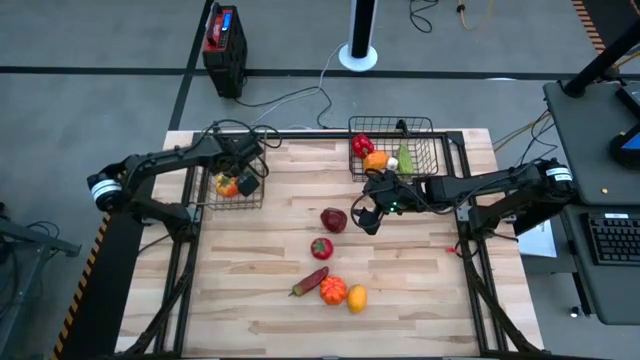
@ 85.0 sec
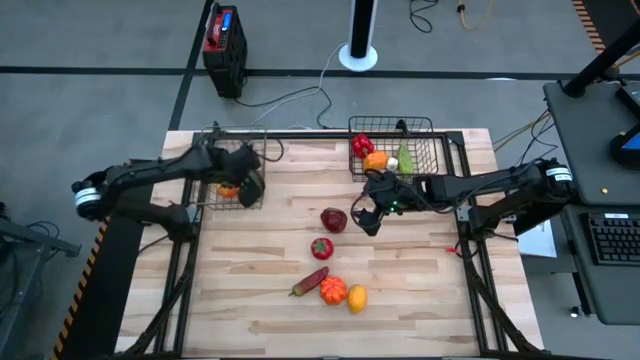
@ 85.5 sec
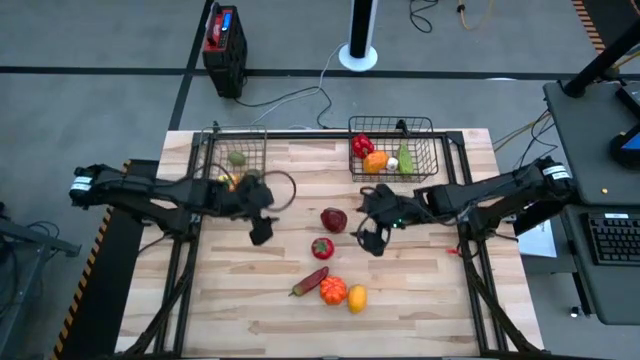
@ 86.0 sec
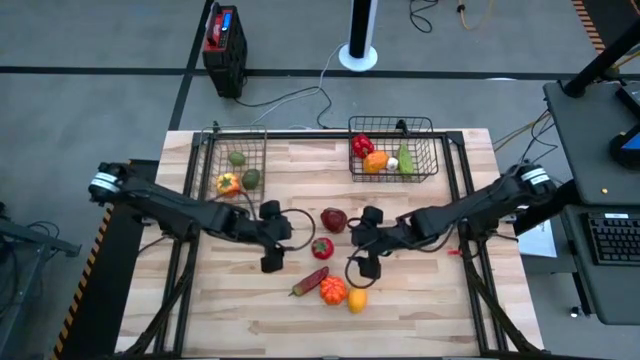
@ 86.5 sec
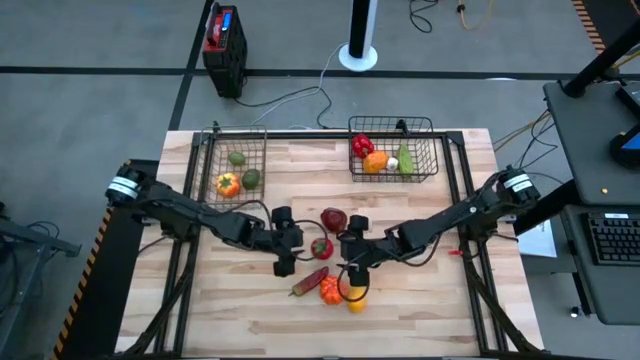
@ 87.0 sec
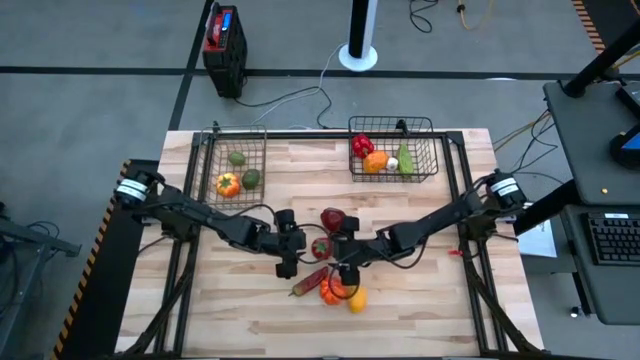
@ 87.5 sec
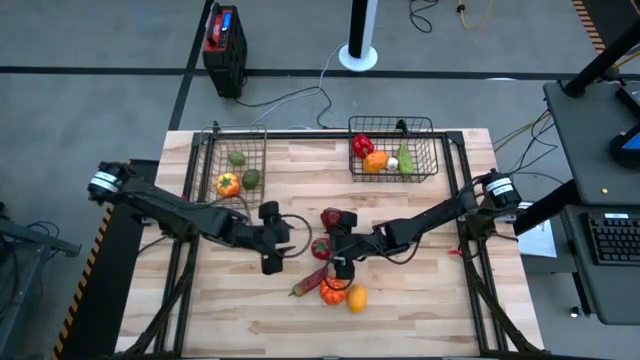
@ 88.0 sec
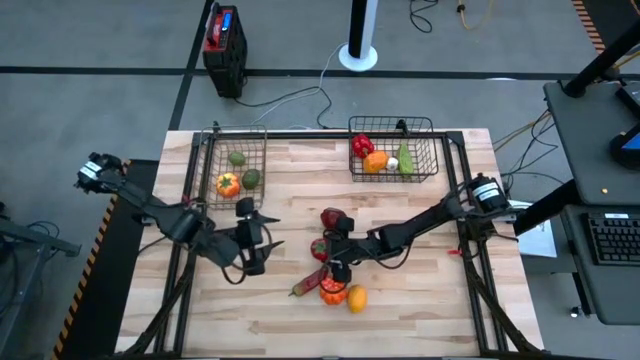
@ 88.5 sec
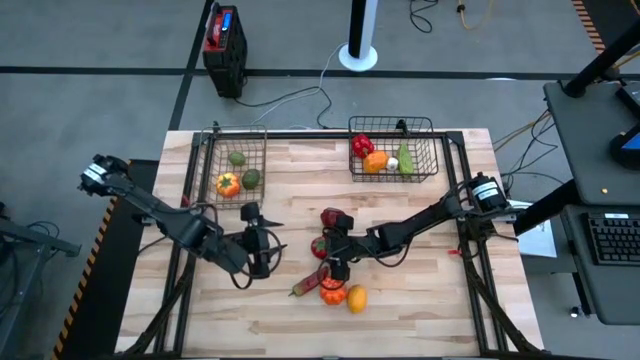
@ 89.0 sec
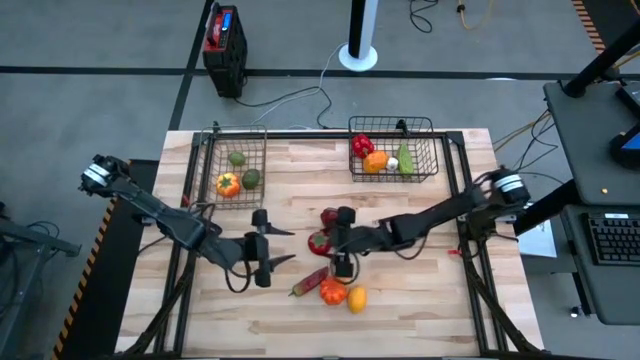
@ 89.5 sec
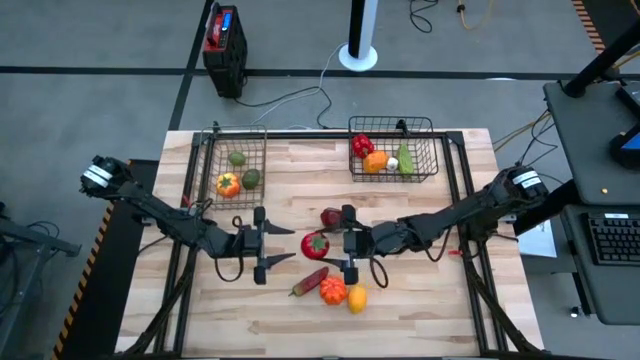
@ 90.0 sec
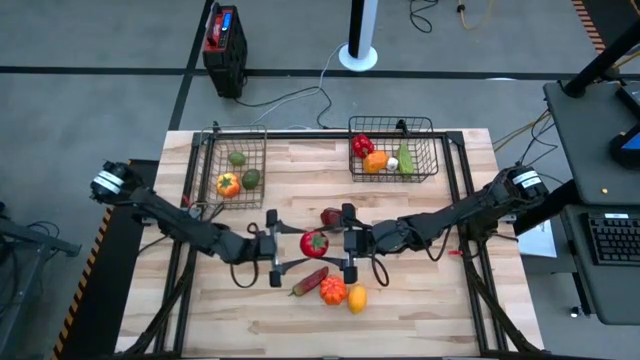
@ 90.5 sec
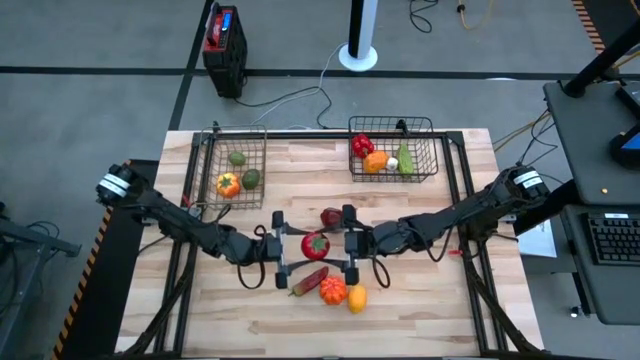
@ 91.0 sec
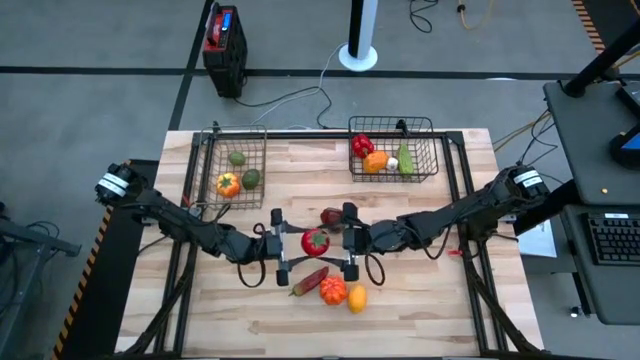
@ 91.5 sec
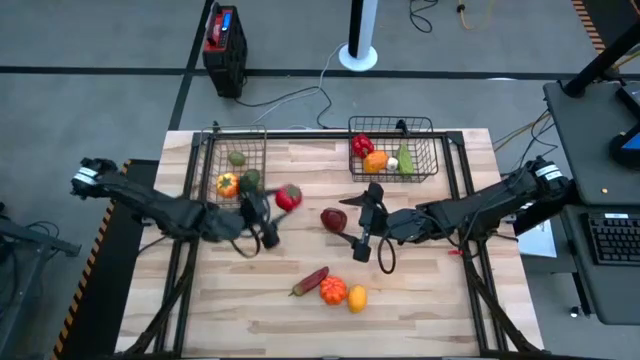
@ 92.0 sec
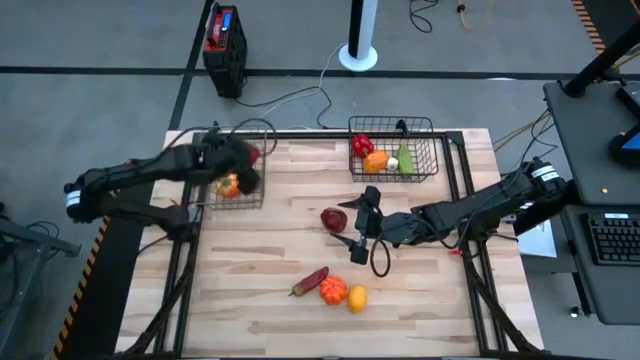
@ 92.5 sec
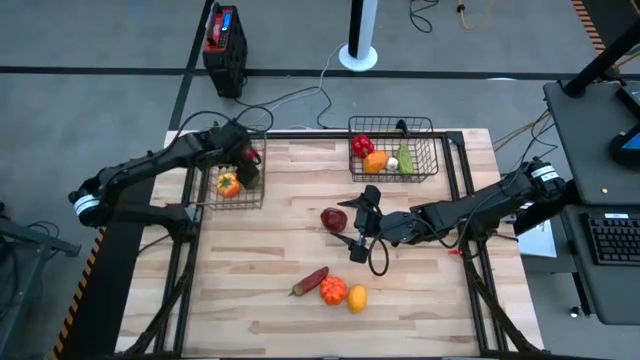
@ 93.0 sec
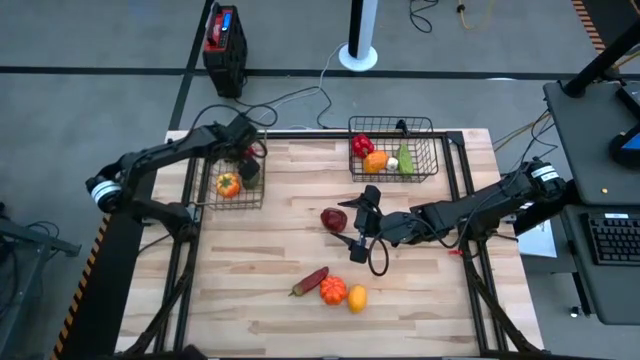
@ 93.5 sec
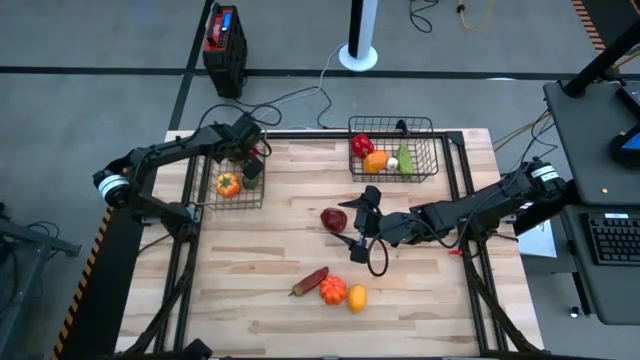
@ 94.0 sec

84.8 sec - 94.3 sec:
Task: Sort produce into baskets
Put the tomato into the brown wire basket

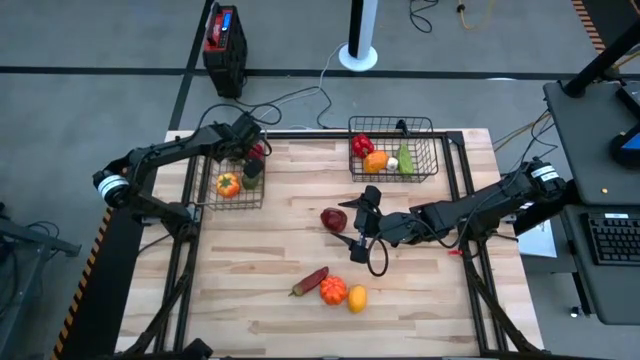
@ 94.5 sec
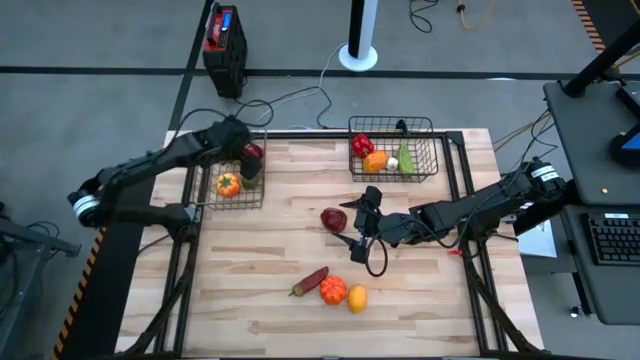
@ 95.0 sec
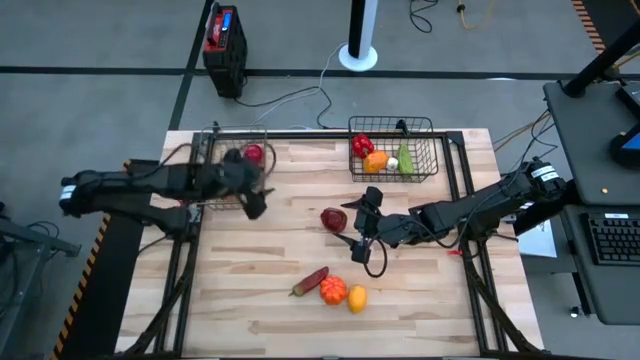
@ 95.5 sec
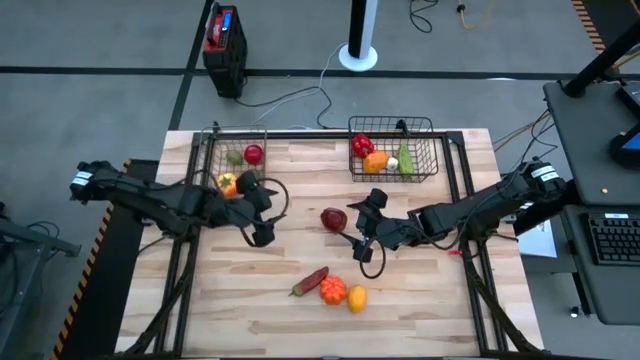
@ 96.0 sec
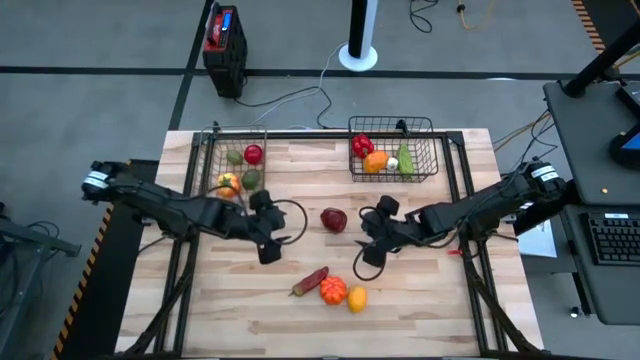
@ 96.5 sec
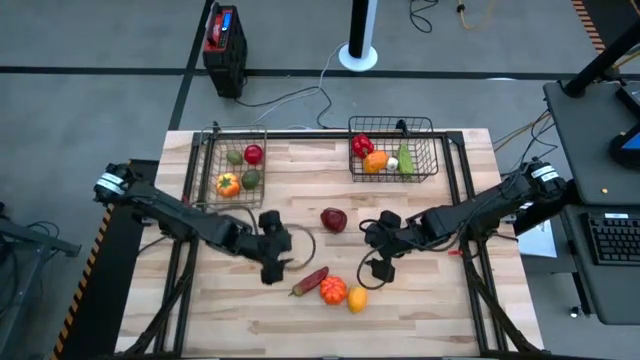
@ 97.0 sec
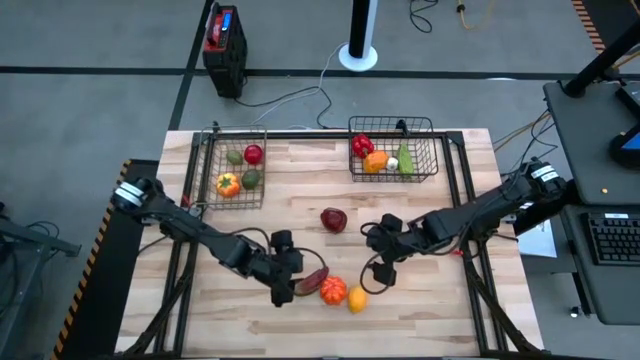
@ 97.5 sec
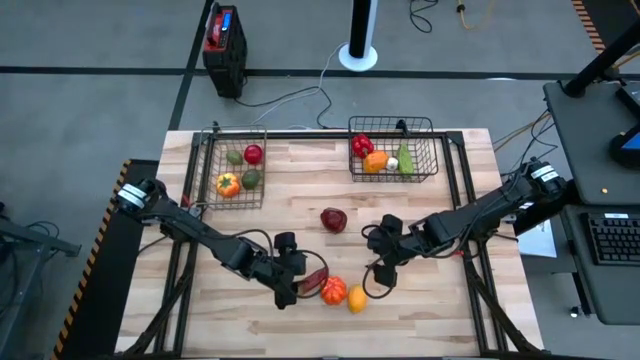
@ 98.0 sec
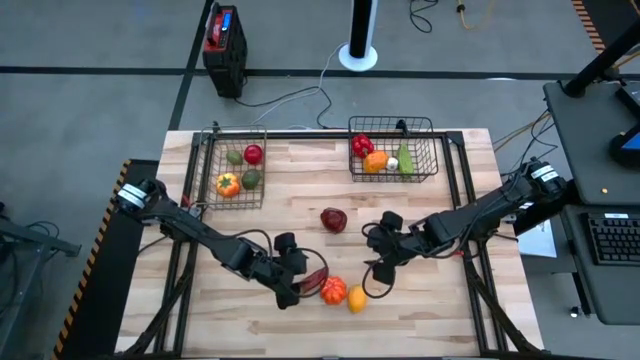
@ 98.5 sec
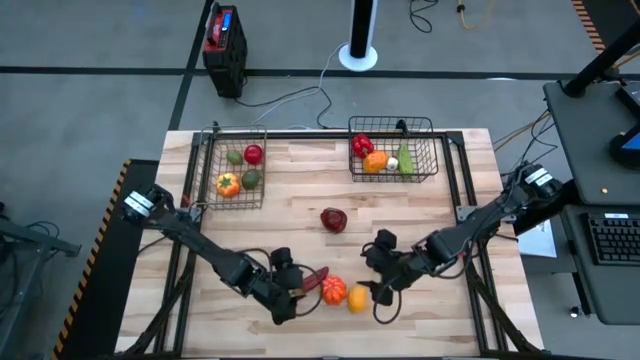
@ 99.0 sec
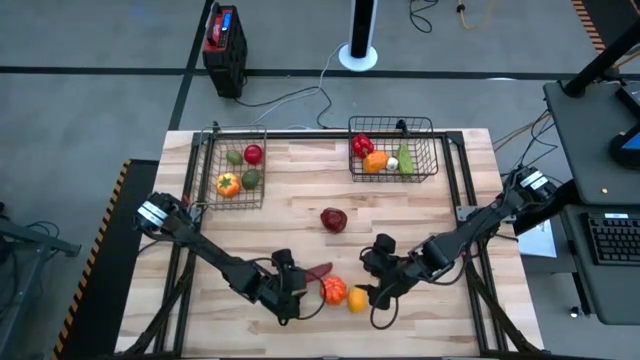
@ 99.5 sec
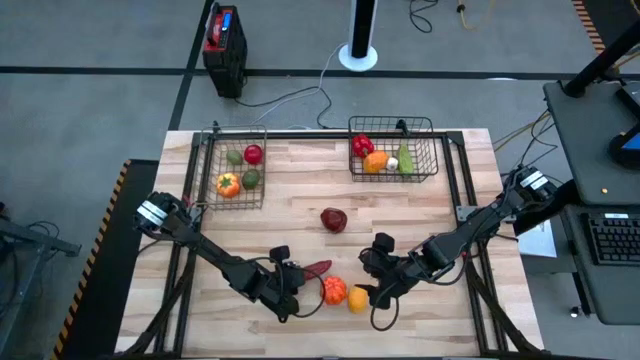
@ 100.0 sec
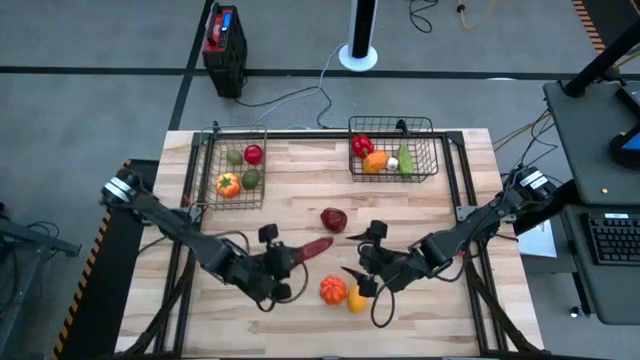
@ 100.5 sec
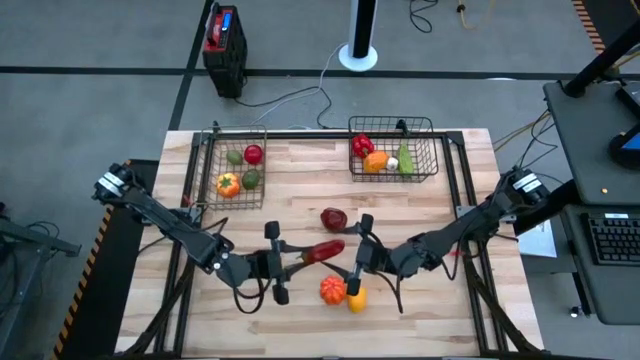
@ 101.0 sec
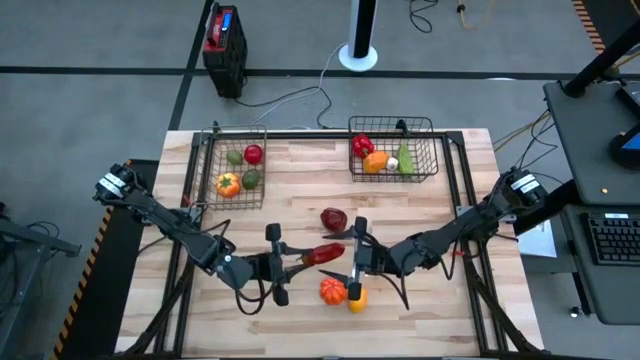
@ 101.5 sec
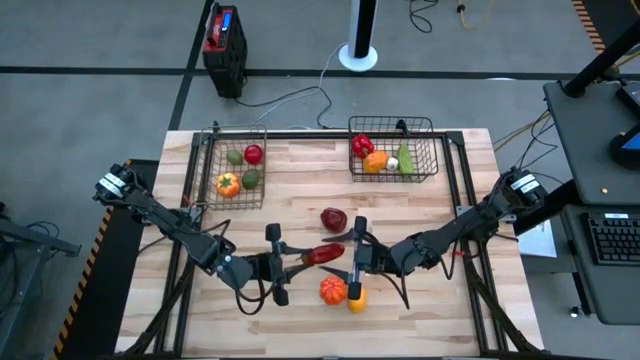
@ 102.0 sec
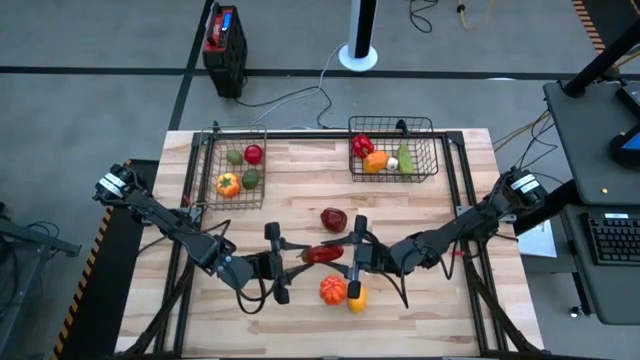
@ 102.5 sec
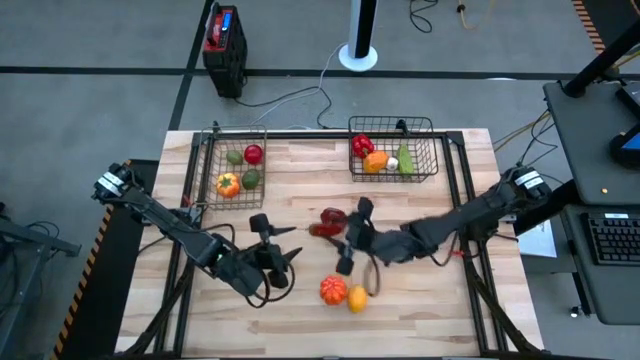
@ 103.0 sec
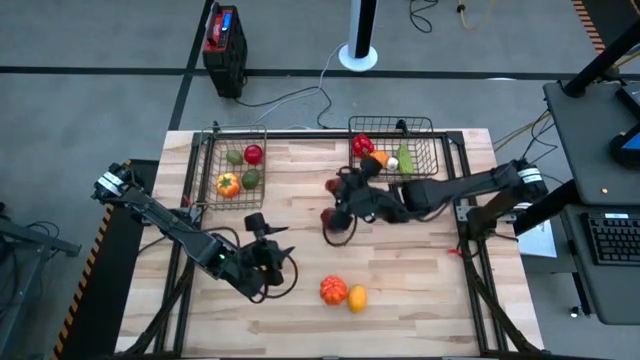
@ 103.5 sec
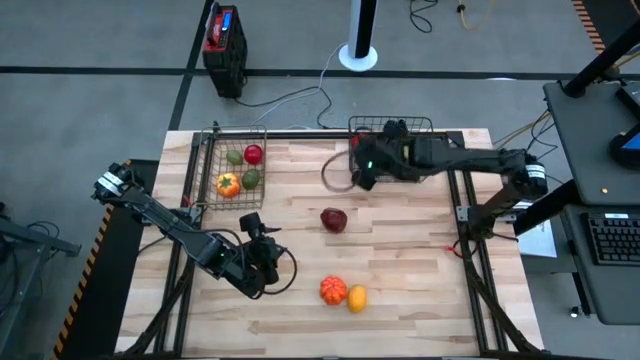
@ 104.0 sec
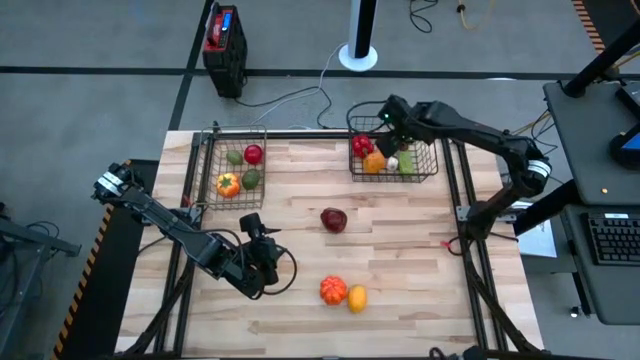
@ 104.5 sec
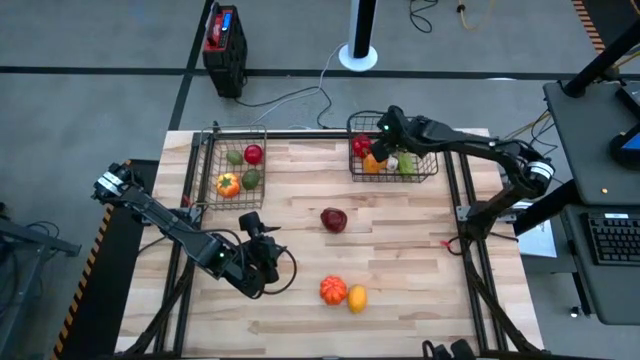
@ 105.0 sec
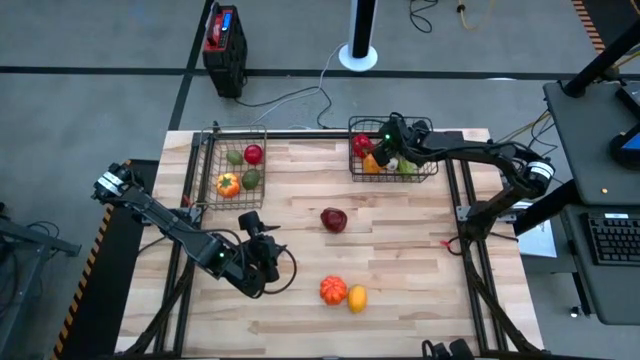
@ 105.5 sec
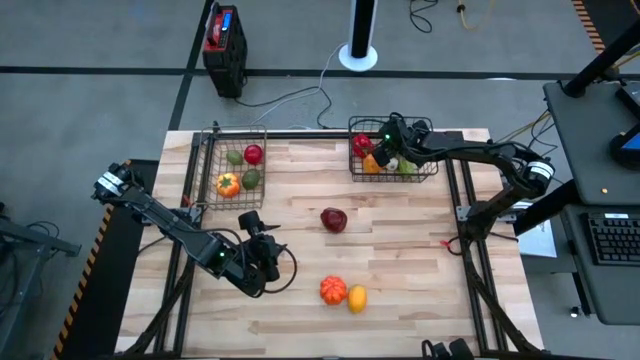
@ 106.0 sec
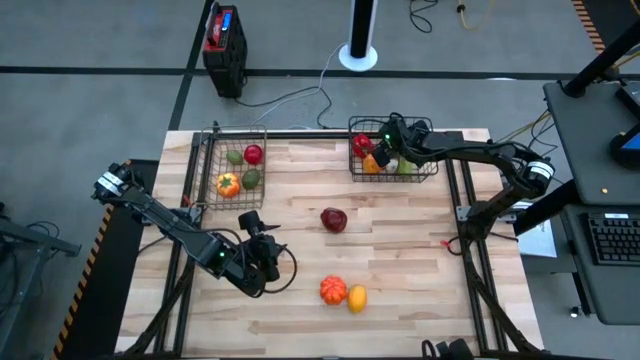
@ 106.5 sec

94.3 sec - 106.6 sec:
Put the chili pepper into the black wire basket
